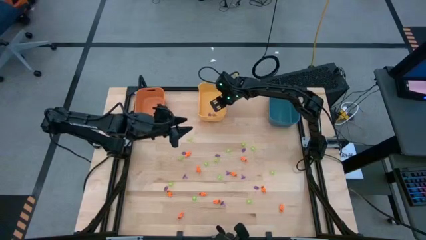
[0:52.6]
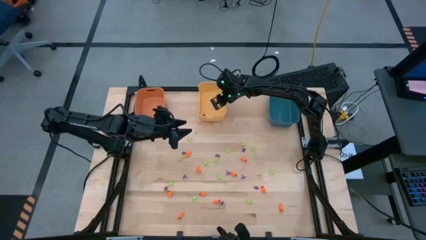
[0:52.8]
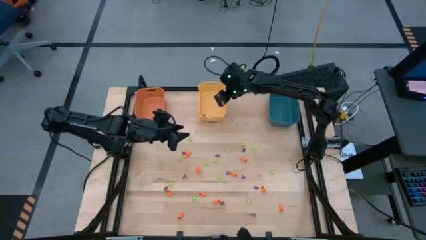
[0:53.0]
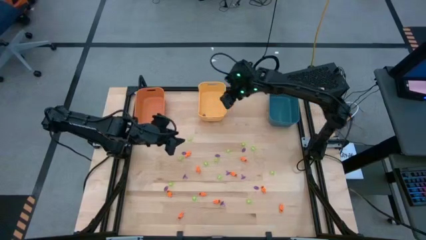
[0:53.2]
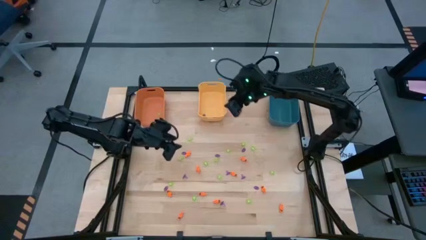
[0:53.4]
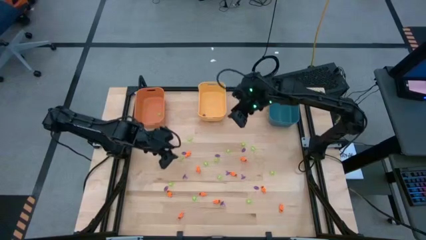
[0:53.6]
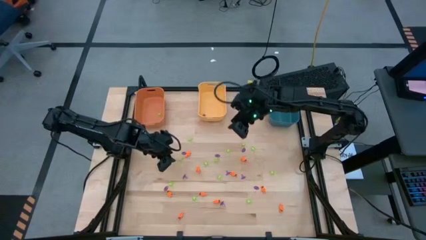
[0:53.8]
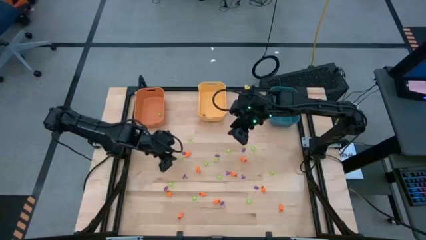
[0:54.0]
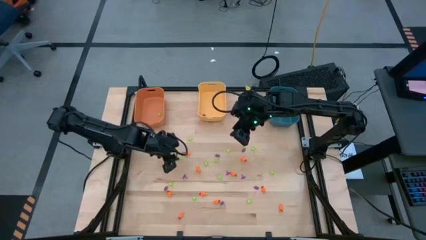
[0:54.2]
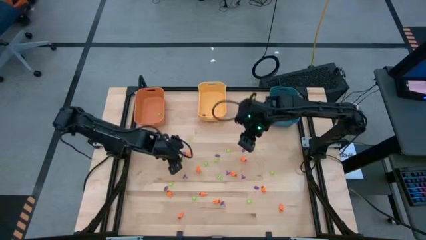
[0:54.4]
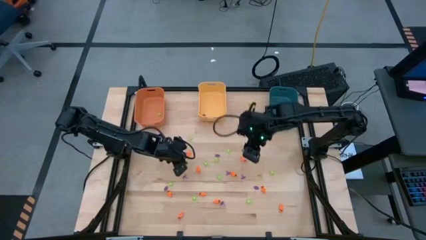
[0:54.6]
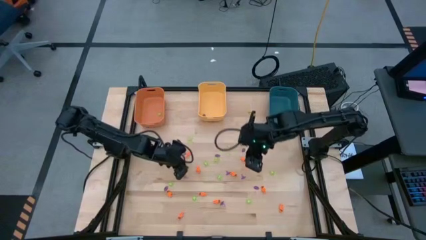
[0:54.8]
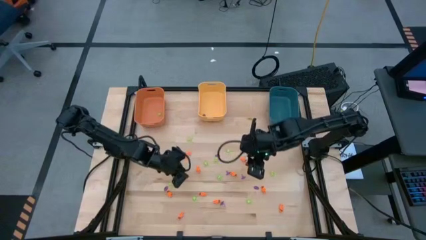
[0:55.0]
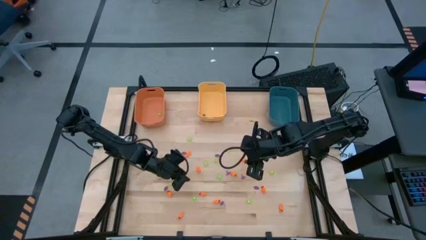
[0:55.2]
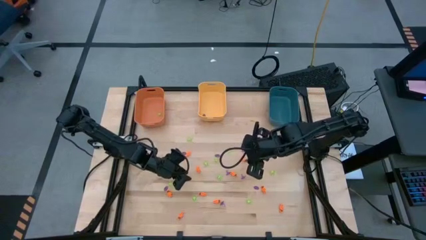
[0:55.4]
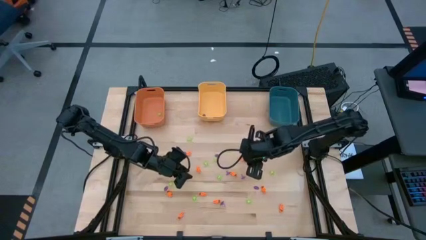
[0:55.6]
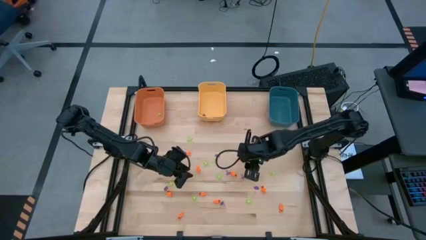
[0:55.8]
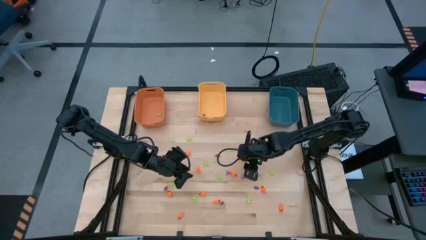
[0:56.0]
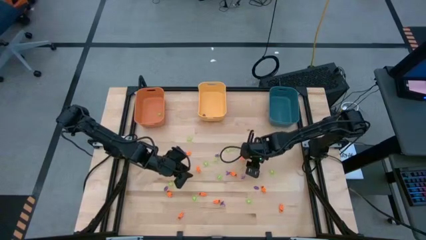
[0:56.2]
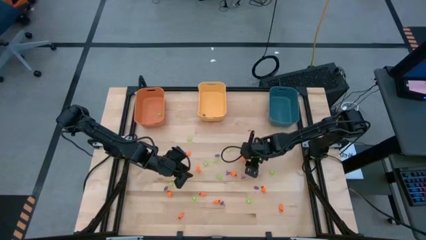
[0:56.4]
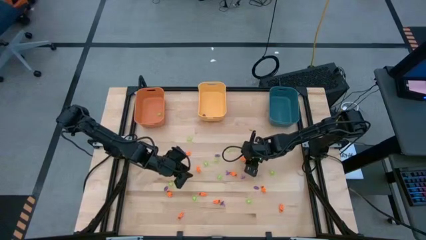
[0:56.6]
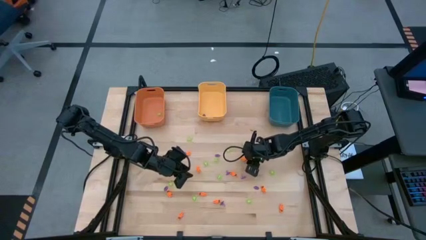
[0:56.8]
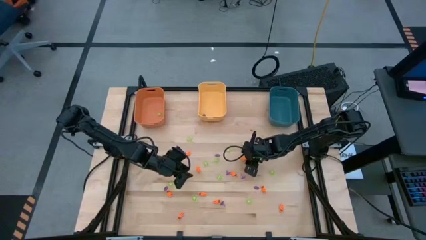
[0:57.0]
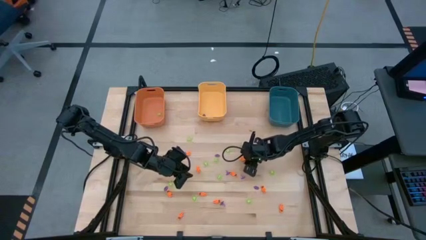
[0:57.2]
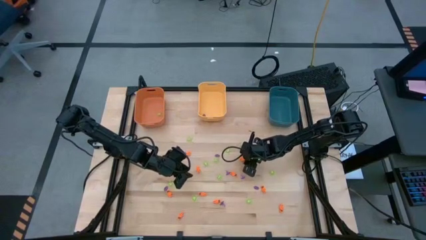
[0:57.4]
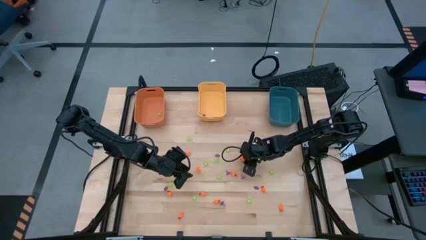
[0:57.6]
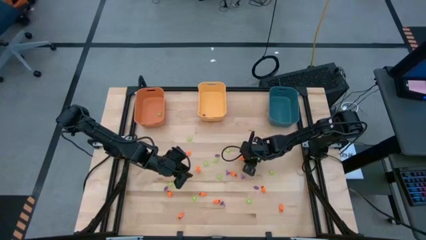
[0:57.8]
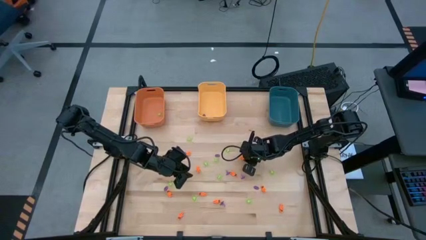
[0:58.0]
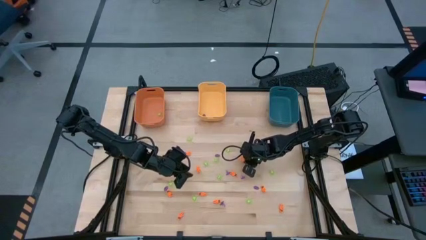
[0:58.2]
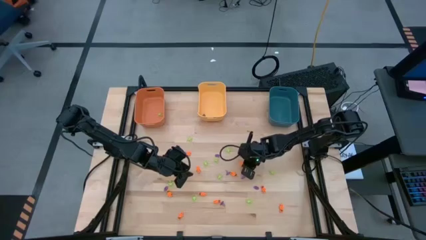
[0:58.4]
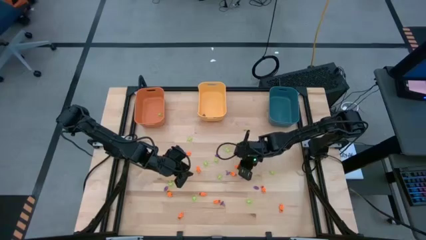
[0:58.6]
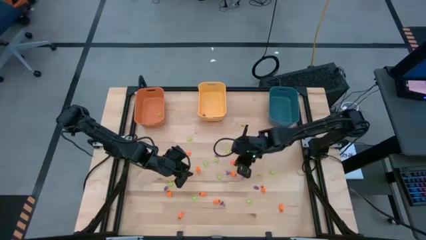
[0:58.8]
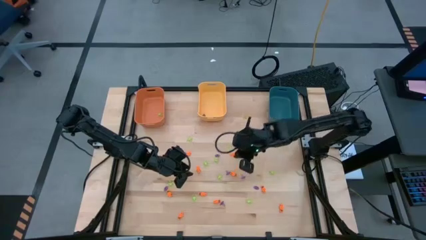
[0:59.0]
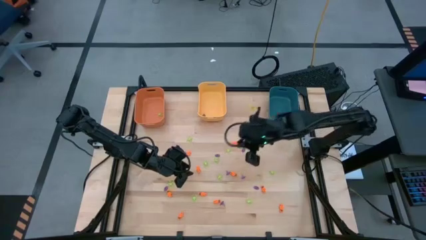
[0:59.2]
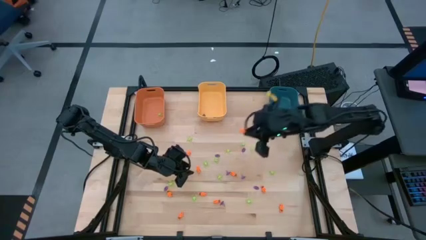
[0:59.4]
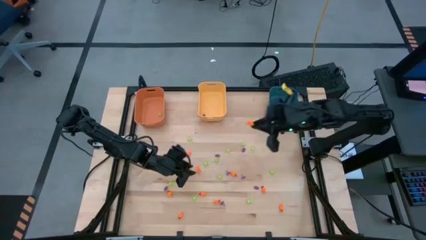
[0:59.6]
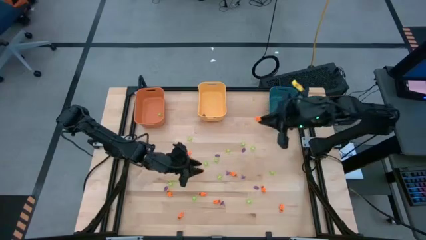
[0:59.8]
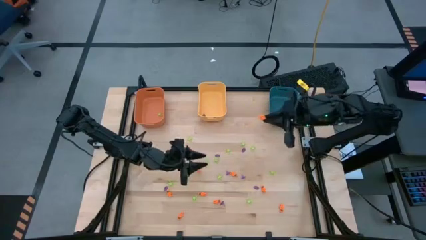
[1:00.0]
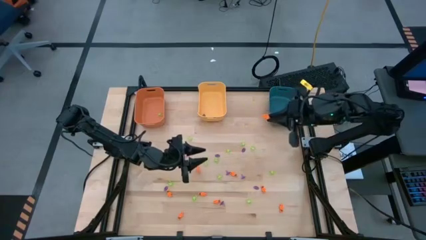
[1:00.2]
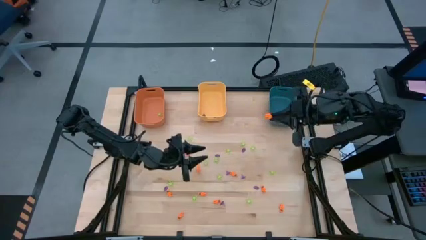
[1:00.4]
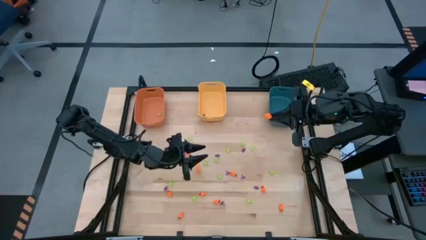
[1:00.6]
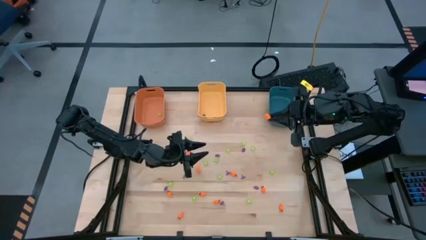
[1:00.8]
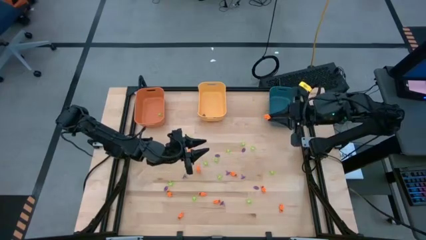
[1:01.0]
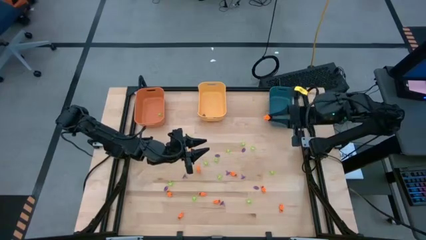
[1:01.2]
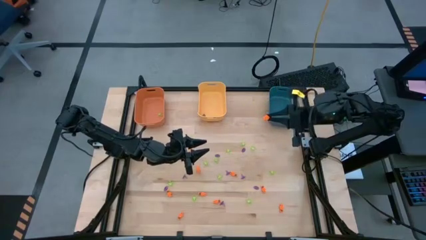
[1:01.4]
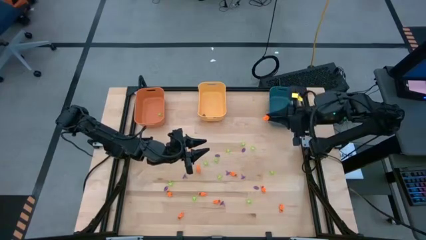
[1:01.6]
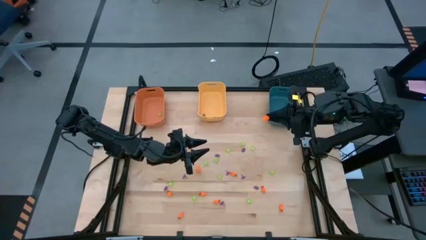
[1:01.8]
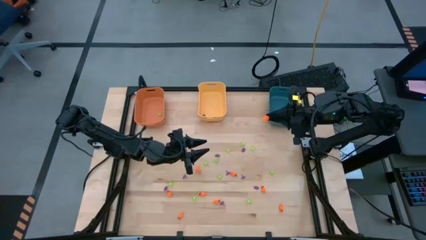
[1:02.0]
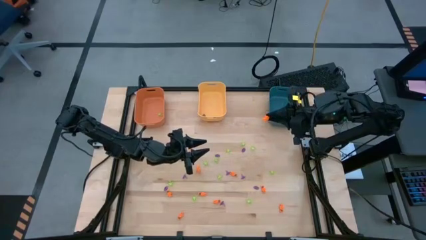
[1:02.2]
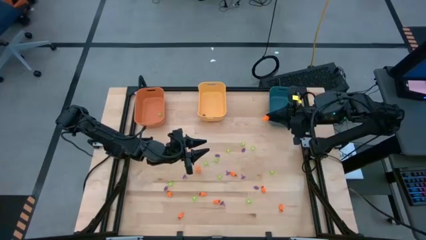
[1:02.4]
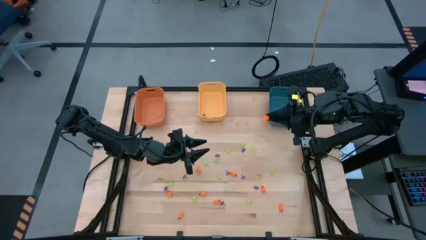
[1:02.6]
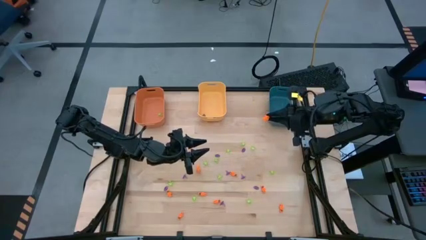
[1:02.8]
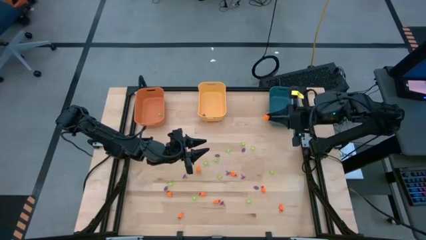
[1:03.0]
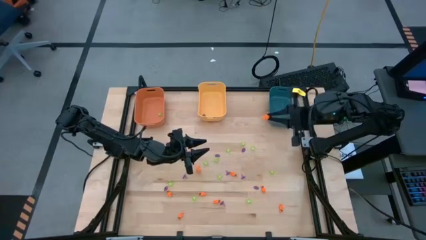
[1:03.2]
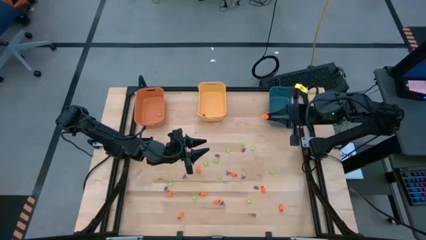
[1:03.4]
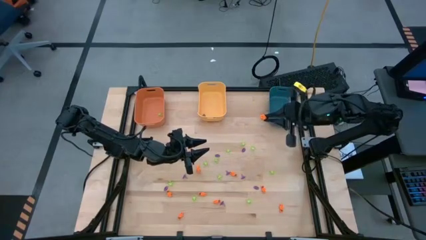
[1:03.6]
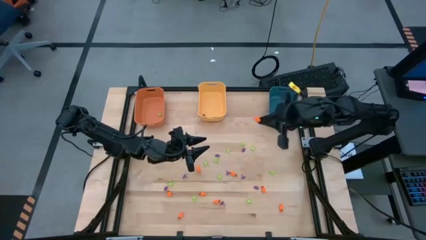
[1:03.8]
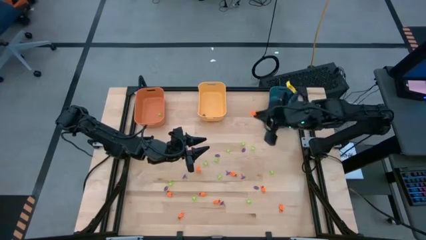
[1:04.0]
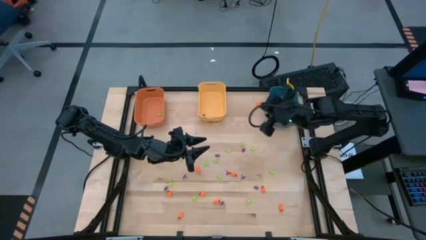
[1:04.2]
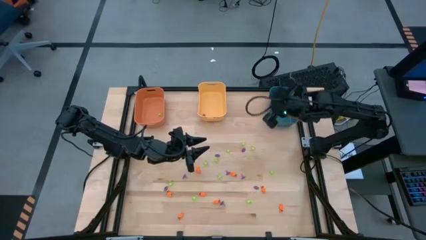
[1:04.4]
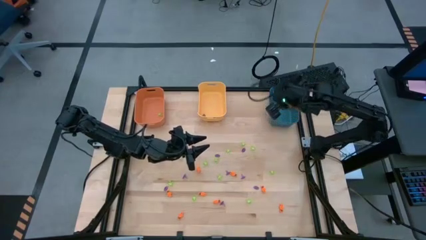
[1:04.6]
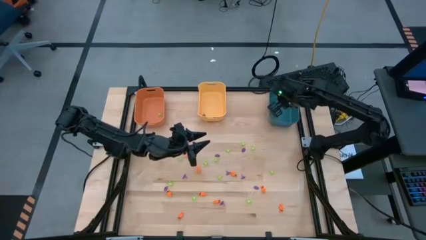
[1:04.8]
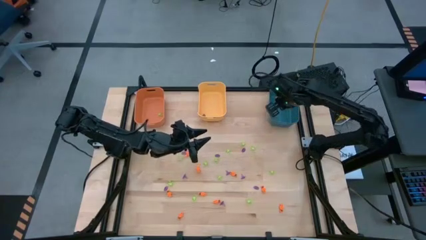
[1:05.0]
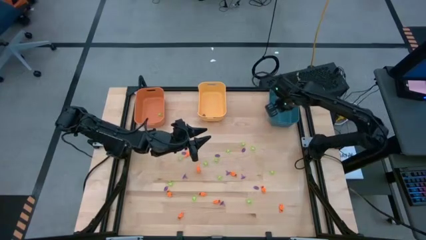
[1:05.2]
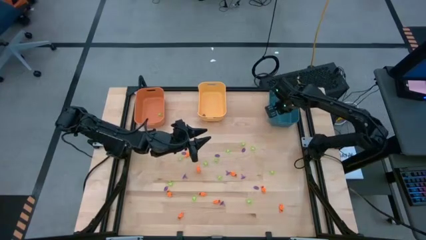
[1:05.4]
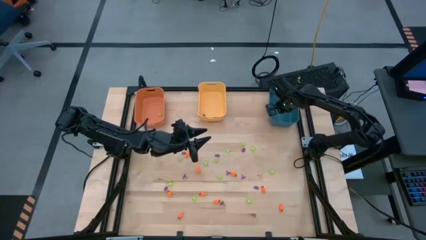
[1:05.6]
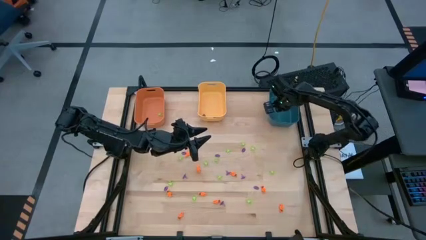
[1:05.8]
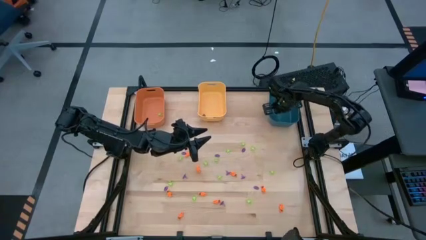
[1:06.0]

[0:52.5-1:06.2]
Task: Sort Halloween decoration
Put the orange skeleton toy into the blue bin

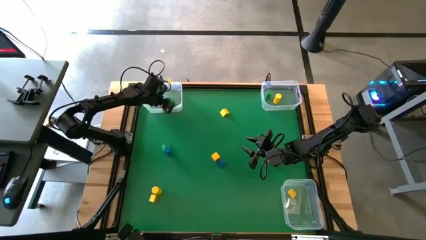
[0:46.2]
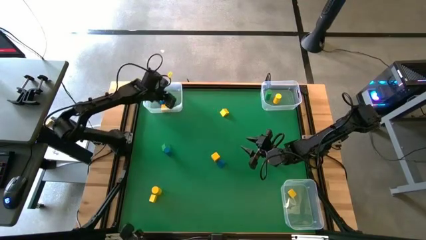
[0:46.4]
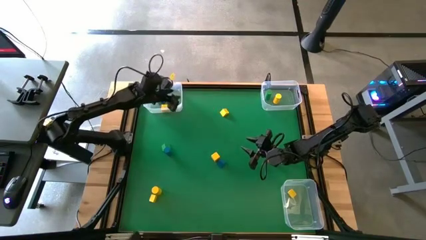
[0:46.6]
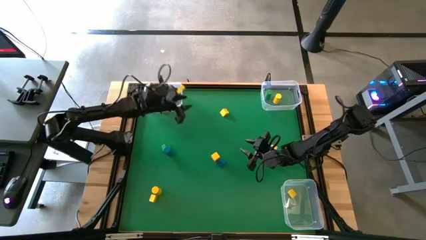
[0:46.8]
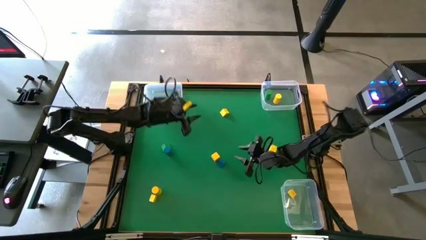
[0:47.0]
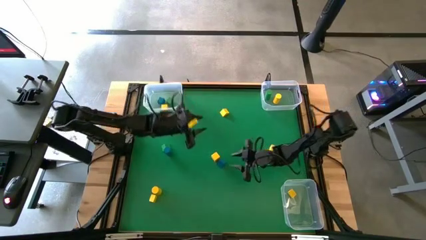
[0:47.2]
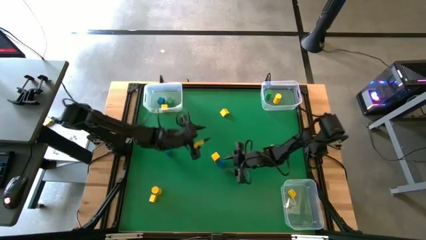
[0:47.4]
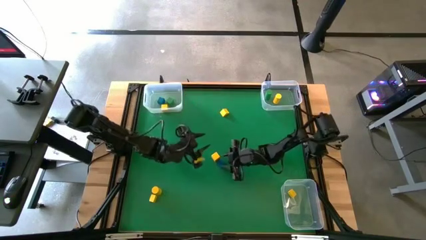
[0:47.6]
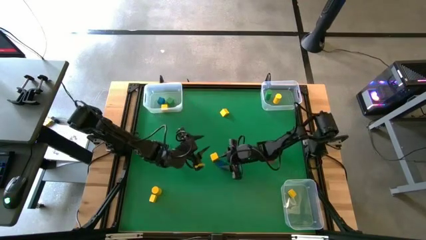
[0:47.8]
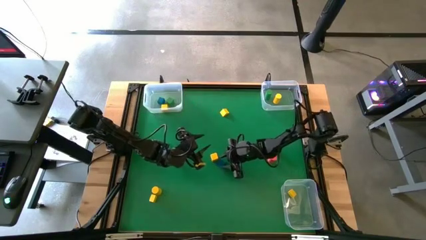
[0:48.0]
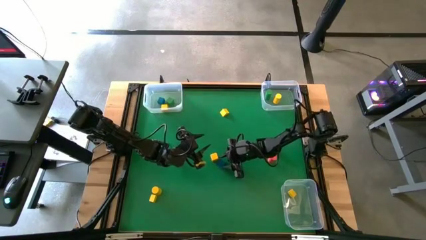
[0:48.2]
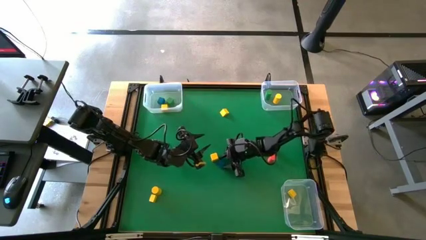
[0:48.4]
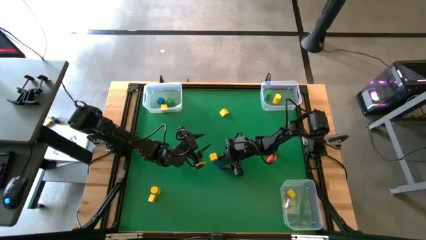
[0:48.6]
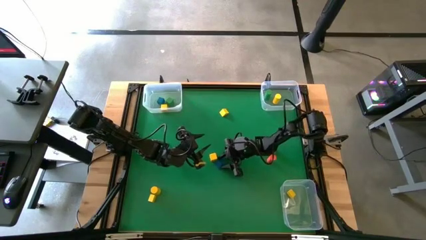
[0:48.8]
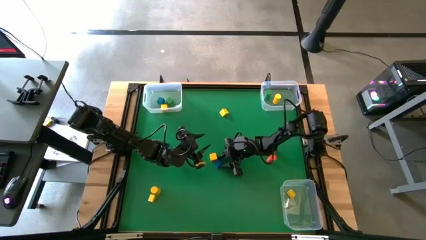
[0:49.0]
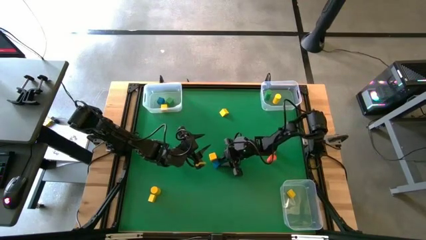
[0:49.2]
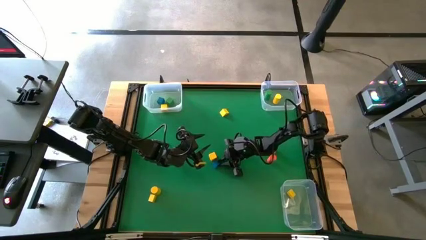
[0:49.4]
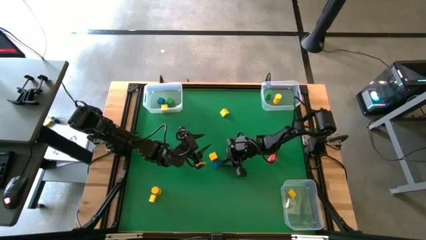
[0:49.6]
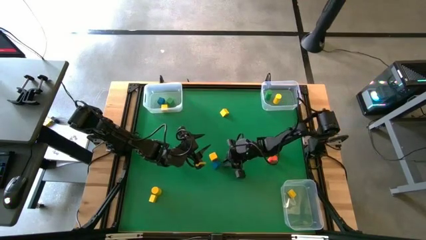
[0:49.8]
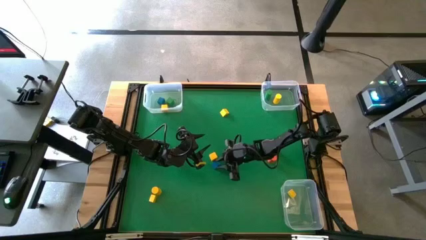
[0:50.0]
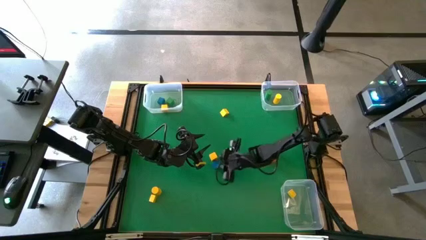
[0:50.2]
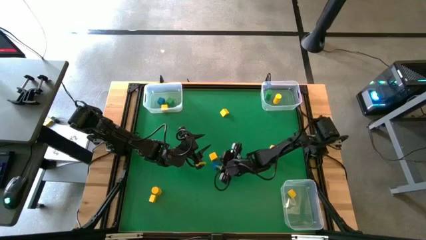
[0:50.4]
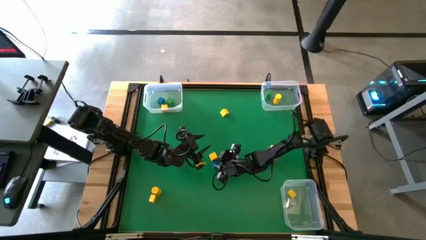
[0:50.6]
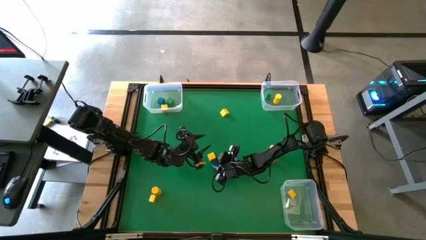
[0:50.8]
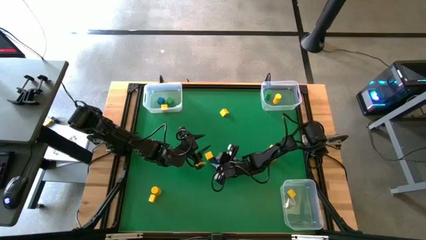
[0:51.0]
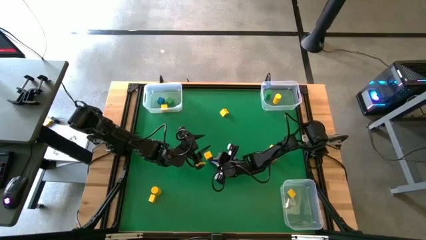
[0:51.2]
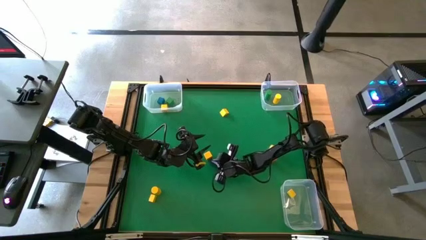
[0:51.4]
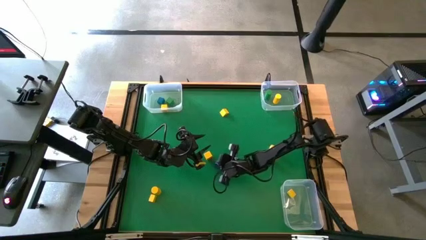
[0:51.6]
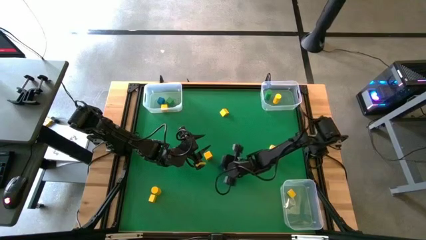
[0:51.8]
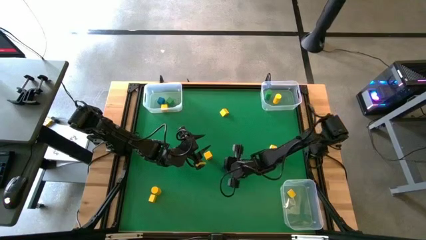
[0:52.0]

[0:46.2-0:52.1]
Task: Sort blocks by size
Put the blue triangle block into the bottom transparent bin
